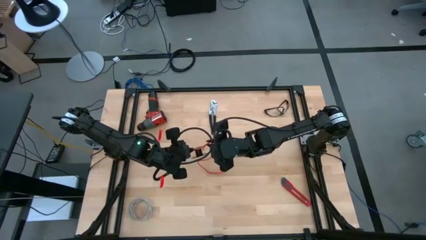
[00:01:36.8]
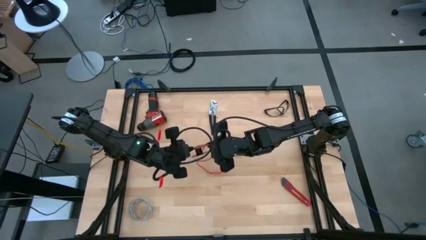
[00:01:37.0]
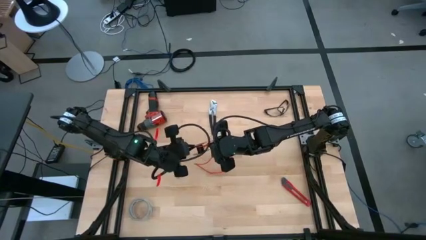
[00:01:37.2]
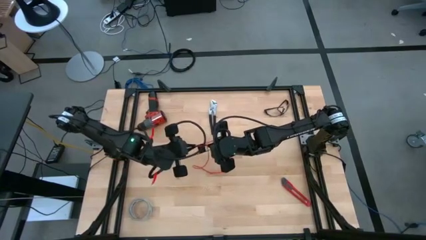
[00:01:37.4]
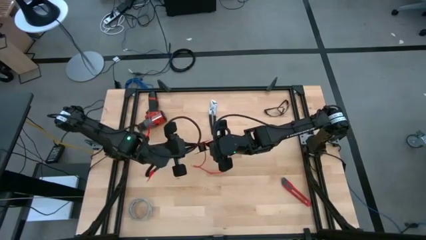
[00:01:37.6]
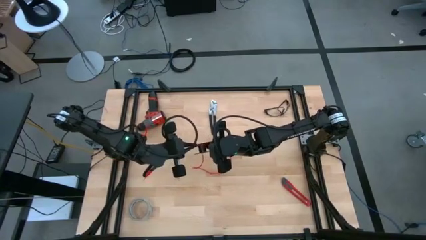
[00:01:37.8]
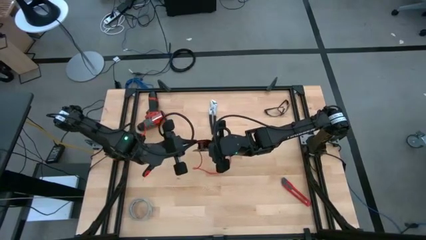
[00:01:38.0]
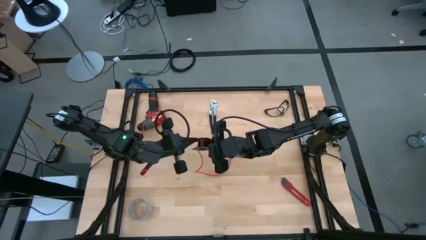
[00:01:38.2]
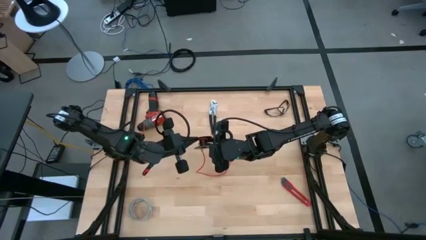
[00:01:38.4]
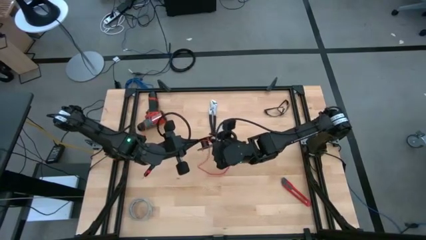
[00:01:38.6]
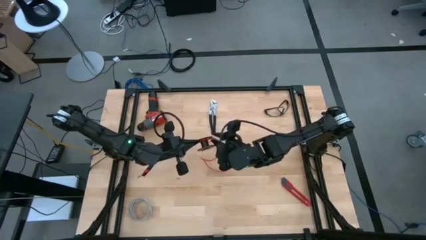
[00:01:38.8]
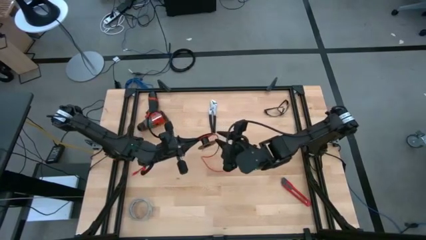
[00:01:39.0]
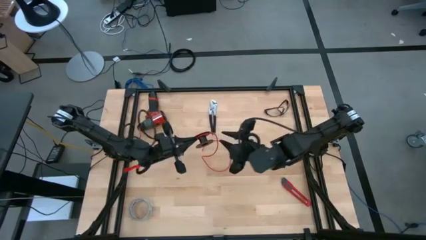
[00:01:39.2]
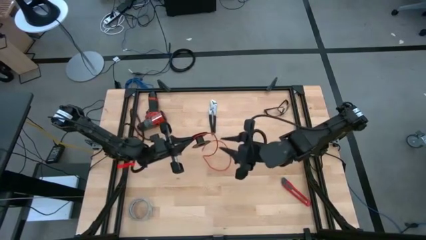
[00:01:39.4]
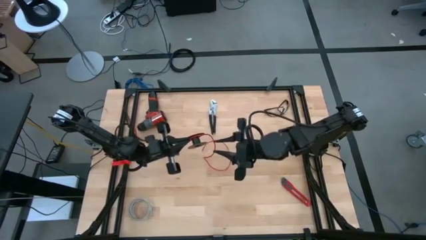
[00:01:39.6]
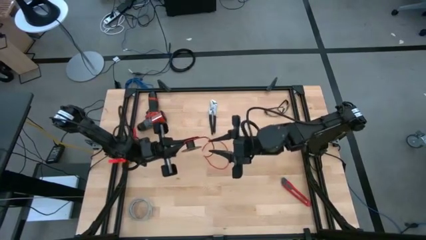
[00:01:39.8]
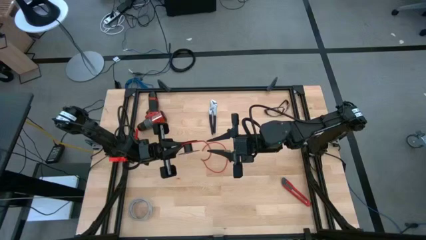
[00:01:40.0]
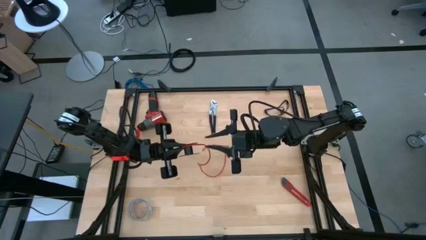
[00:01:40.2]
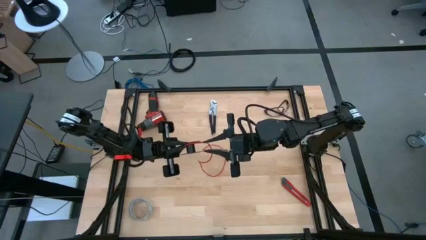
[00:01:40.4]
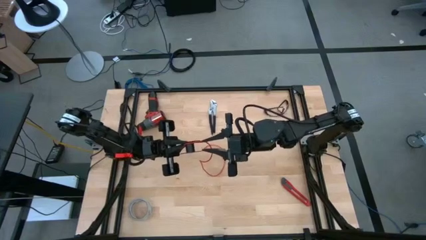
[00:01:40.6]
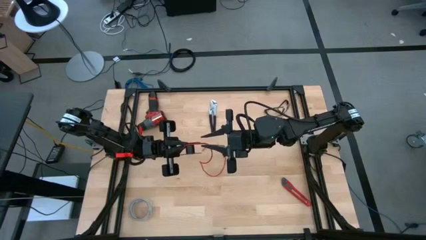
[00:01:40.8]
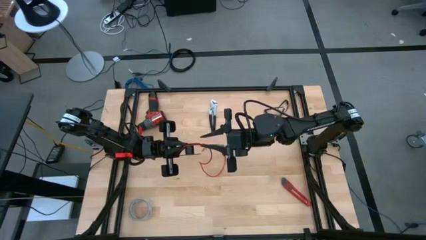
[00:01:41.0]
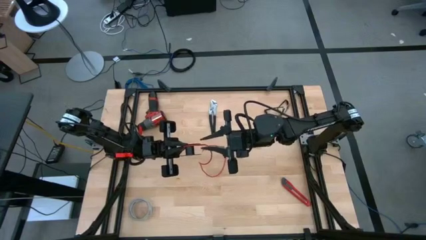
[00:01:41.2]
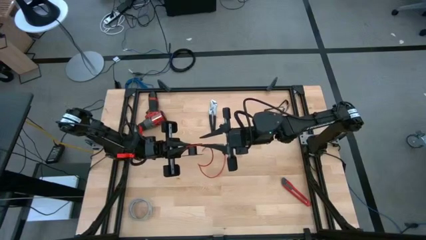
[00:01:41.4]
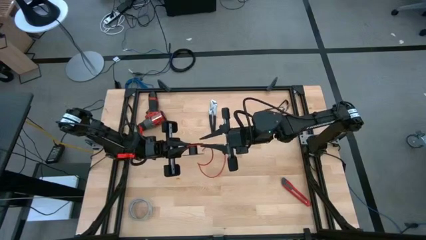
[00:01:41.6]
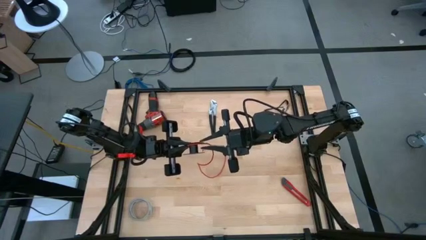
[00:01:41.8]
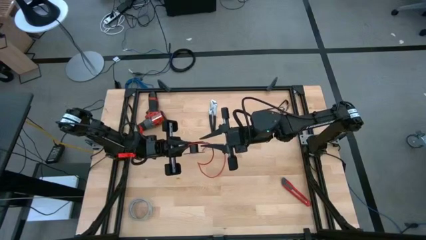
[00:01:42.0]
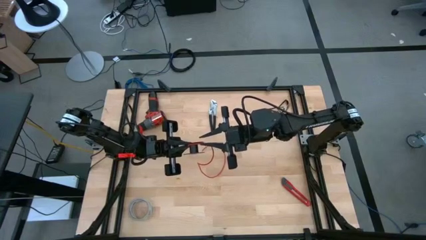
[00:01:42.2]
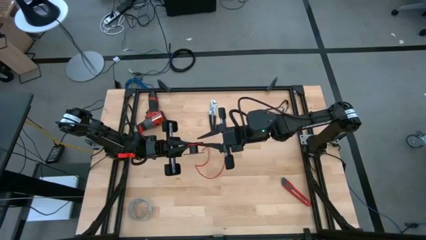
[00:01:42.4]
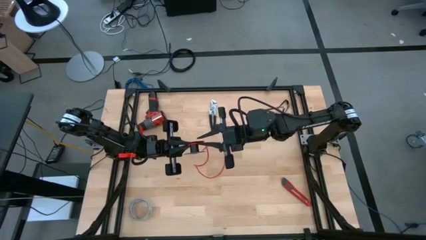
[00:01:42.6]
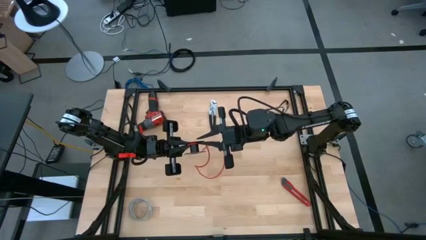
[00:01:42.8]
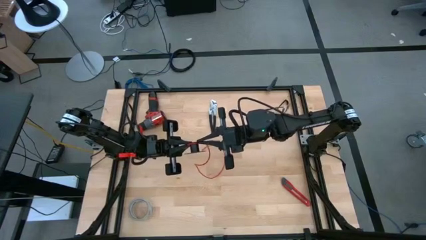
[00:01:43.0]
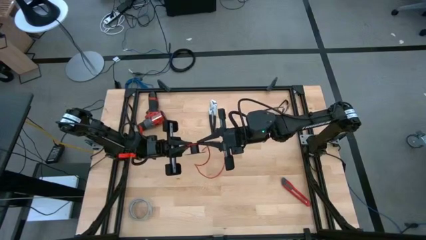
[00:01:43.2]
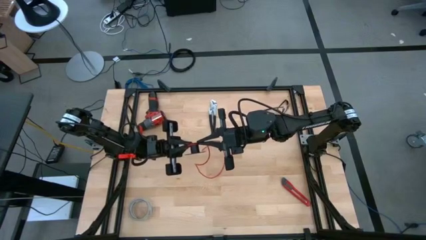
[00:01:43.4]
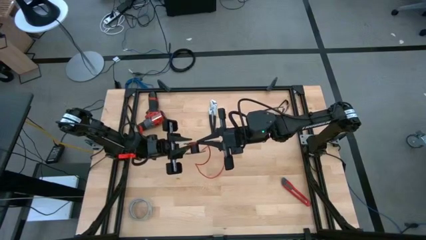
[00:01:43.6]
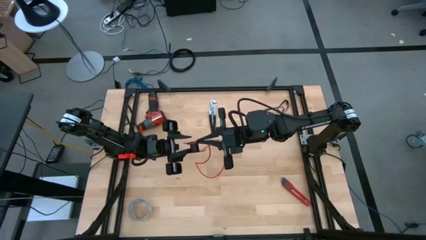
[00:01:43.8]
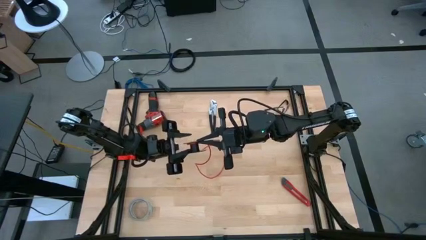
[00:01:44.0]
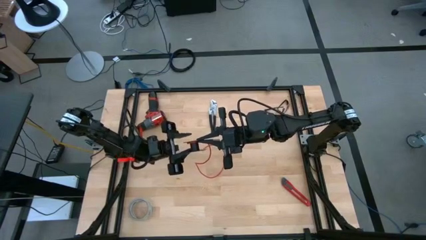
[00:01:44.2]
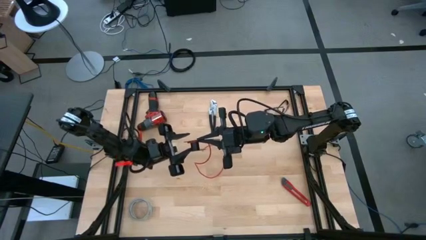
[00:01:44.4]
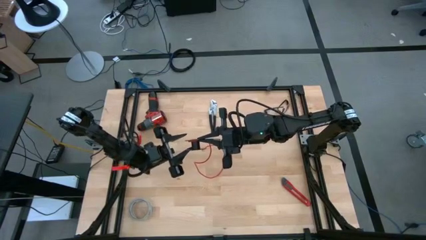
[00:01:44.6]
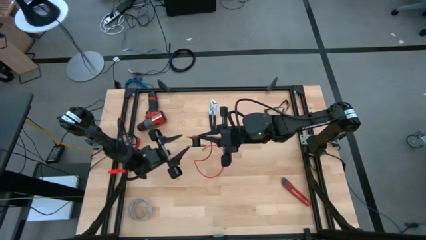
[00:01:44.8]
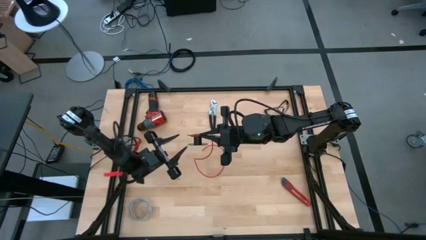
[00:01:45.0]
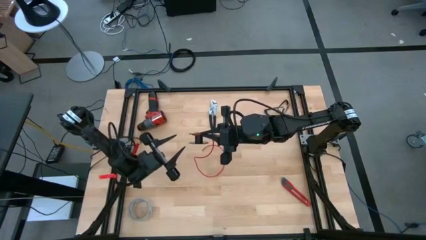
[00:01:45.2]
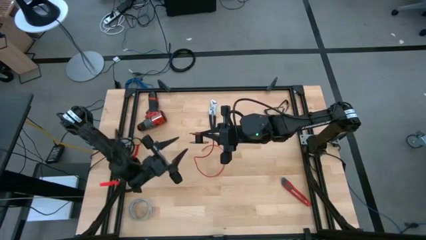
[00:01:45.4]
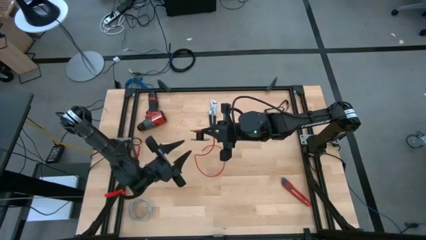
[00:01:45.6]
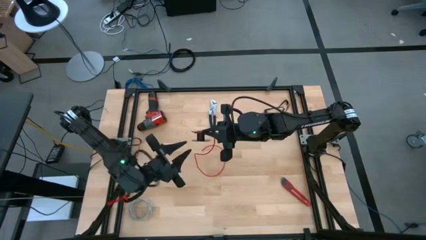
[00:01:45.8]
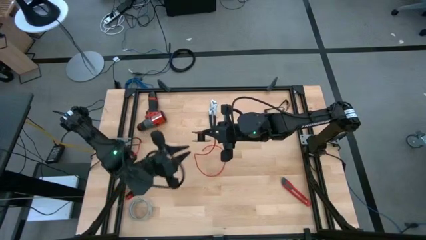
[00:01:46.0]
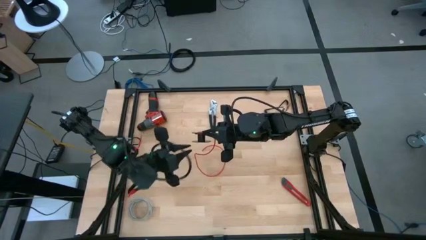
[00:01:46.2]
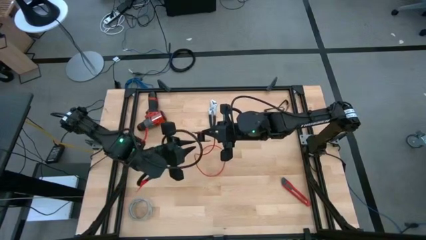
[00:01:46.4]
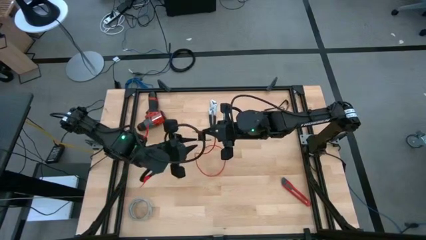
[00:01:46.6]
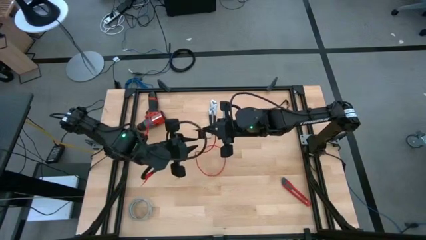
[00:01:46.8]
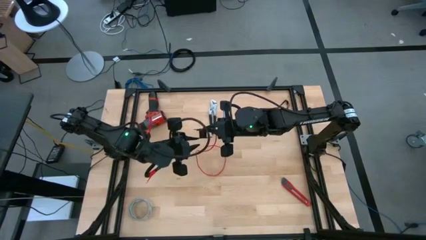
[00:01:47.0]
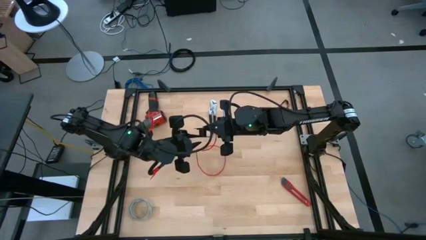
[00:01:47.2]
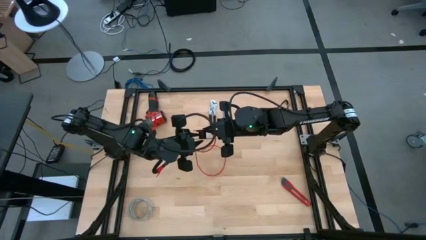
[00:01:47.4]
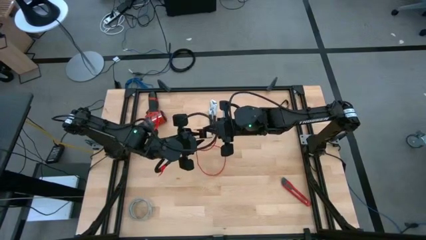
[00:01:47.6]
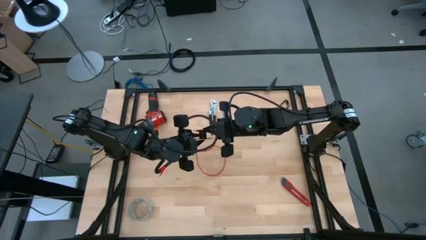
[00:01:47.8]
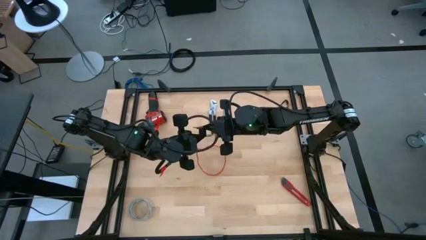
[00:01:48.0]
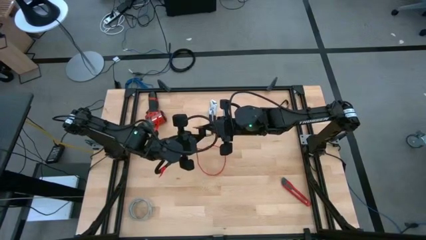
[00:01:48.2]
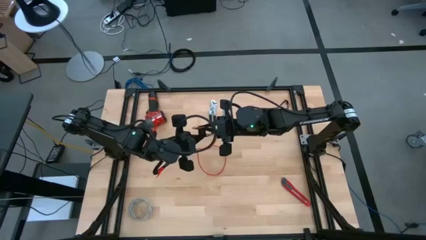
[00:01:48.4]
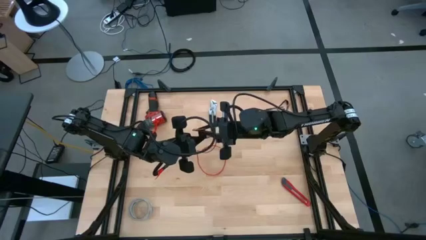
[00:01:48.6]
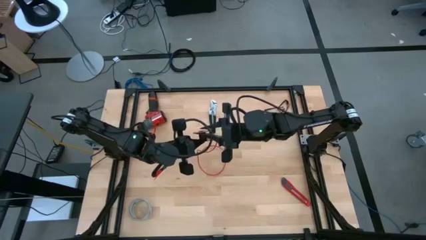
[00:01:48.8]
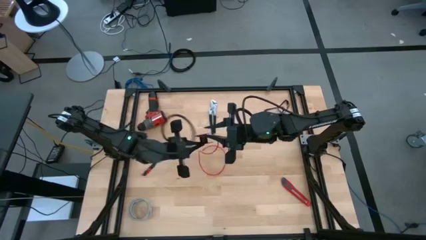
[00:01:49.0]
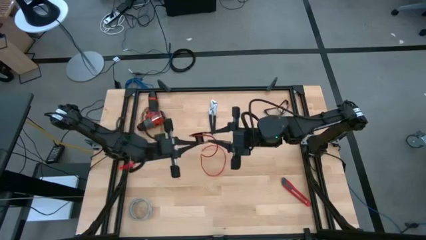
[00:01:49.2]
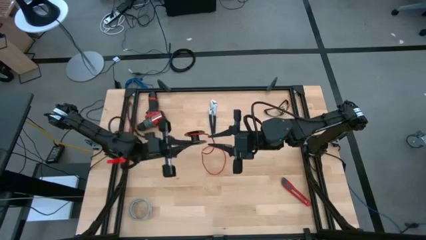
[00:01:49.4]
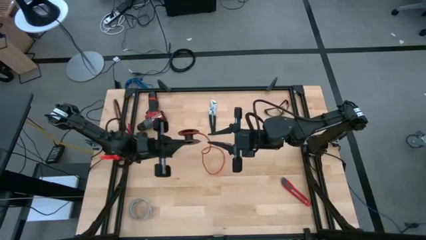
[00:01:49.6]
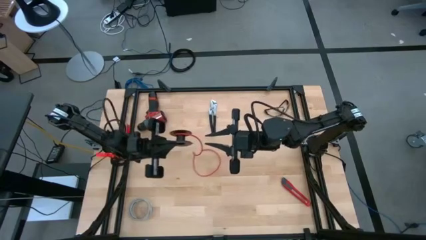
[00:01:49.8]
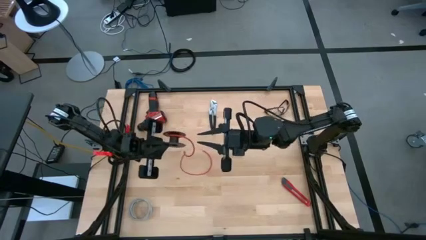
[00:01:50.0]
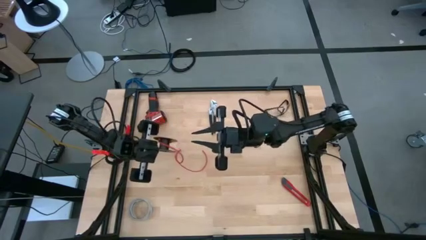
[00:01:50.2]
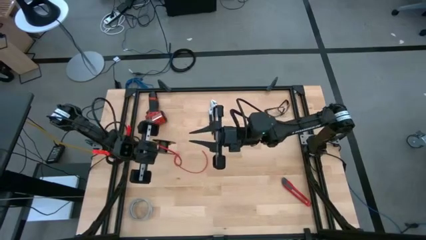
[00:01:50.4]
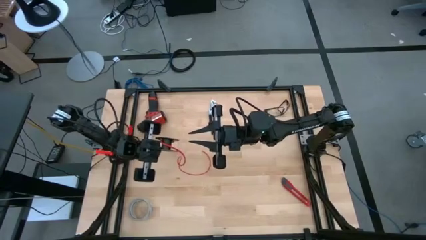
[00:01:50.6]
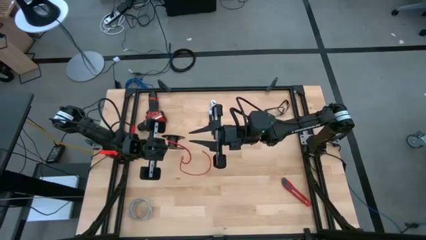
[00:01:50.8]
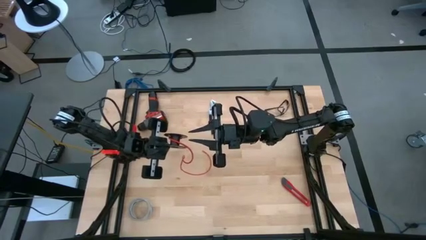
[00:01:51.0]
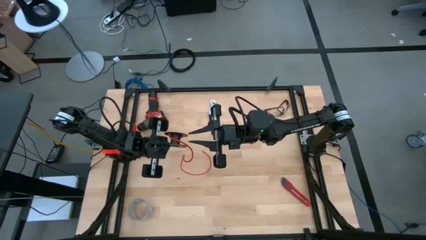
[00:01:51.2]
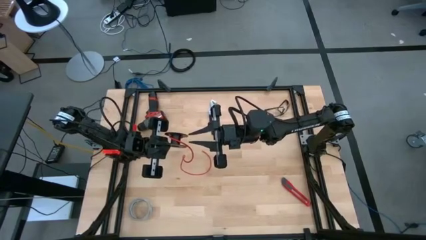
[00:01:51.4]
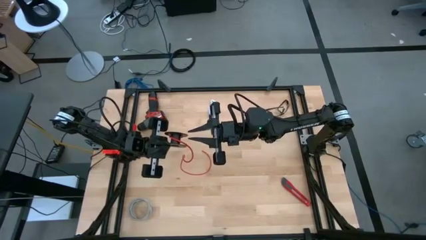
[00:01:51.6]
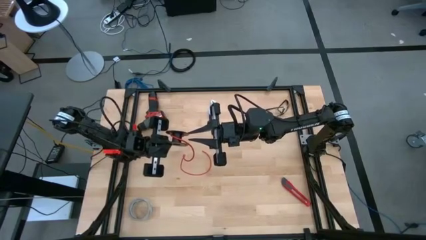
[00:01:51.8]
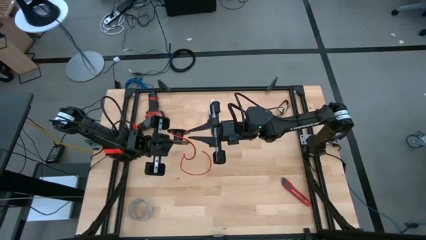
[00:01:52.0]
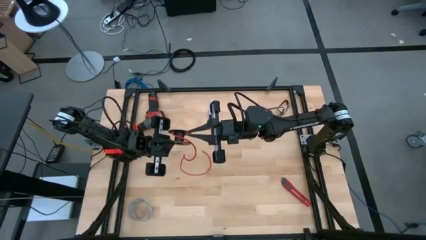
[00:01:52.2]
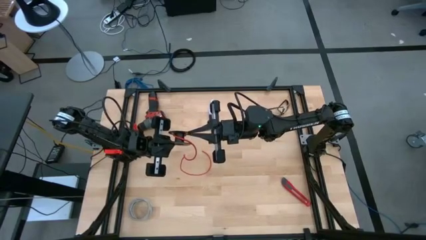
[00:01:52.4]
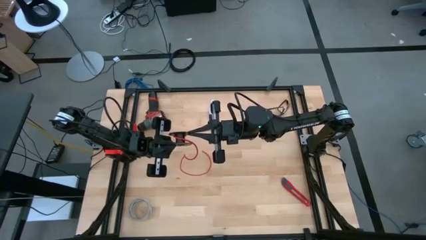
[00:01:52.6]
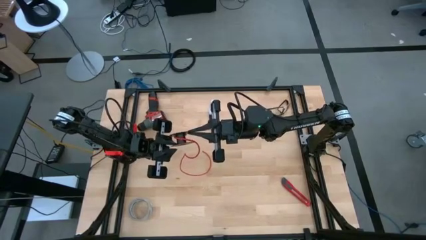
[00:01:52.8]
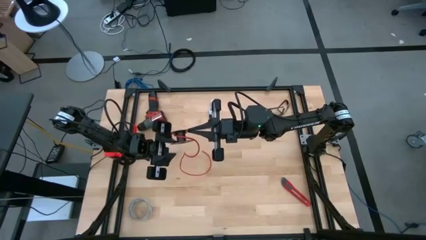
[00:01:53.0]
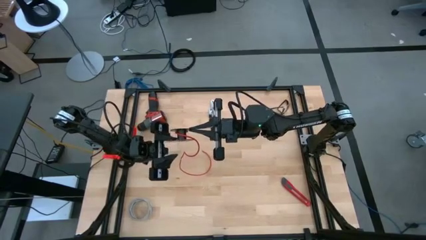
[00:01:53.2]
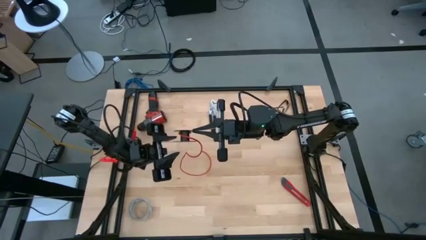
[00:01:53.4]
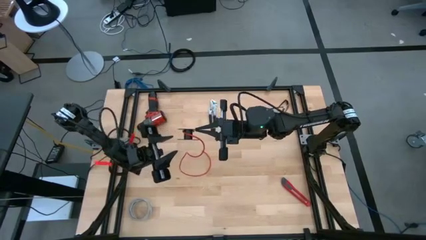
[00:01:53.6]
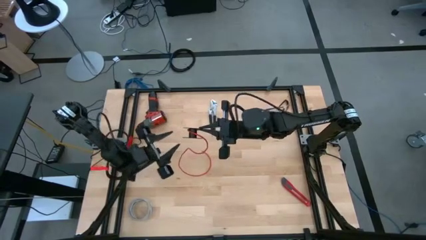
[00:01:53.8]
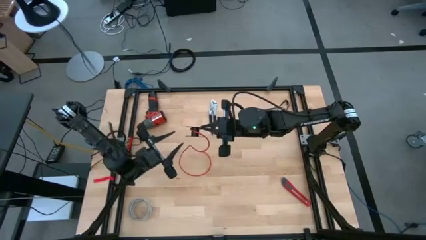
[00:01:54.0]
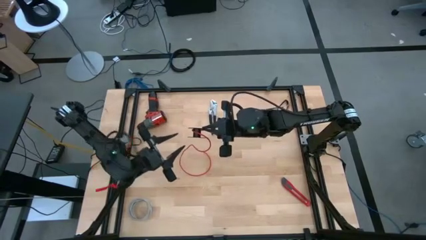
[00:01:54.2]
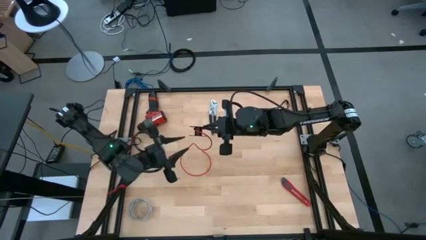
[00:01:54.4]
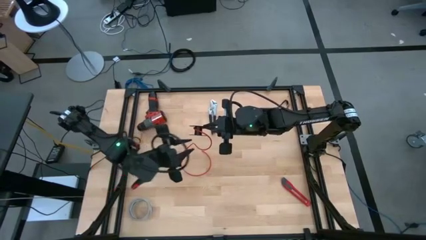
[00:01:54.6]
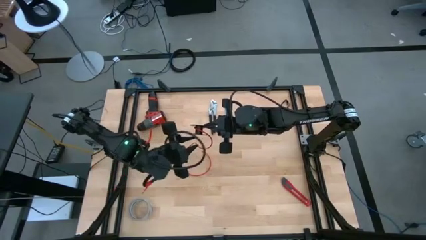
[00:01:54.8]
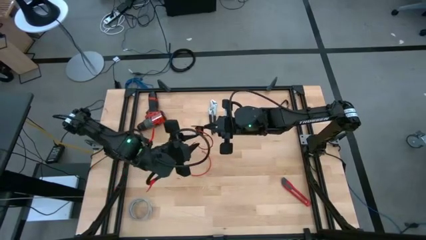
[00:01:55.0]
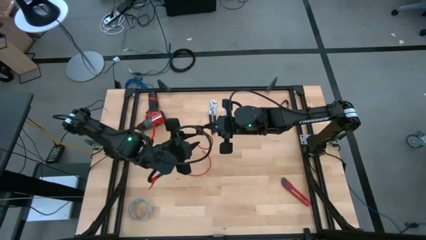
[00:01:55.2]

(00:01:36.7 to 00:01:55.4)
Task: Coil cords
Coil the red wire onto the black spool
